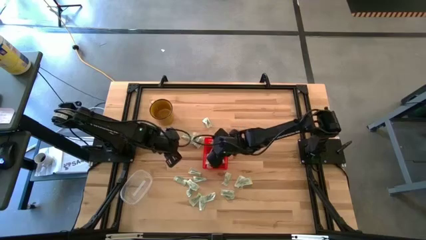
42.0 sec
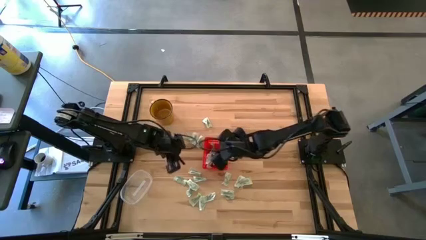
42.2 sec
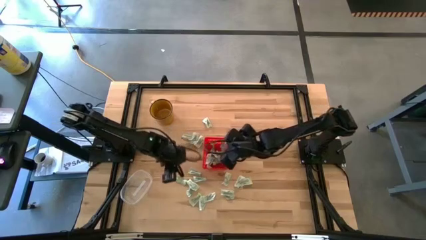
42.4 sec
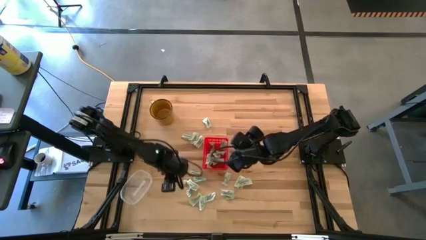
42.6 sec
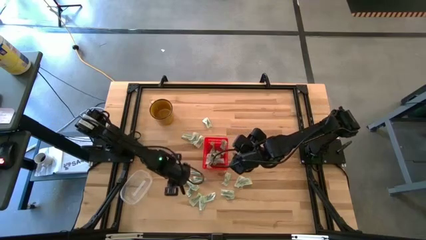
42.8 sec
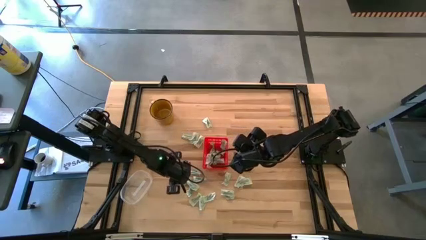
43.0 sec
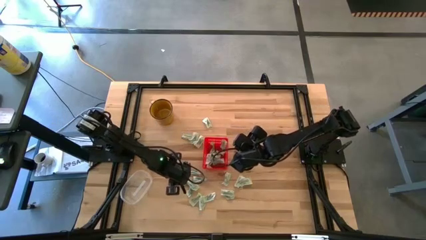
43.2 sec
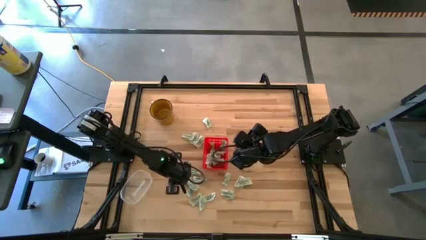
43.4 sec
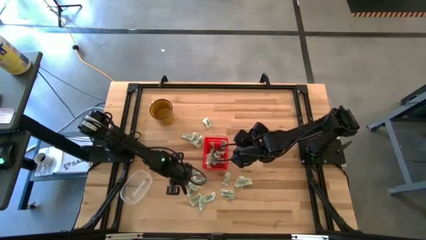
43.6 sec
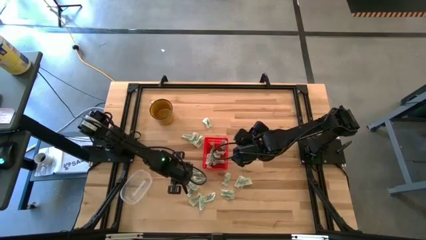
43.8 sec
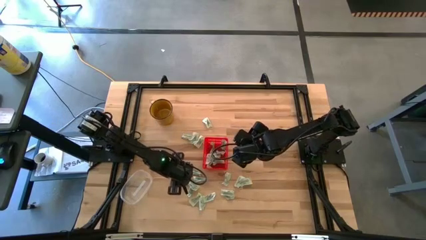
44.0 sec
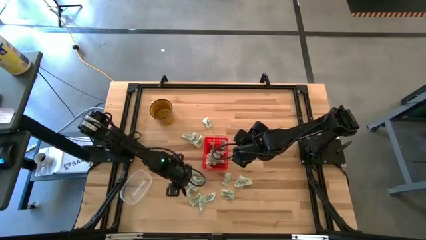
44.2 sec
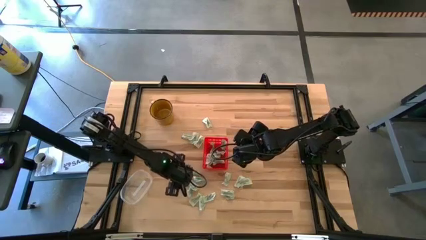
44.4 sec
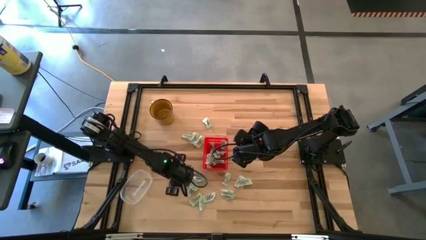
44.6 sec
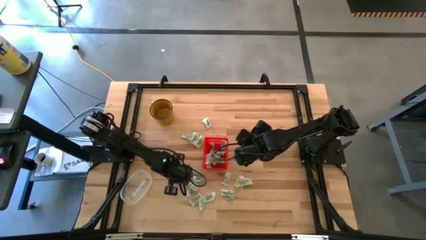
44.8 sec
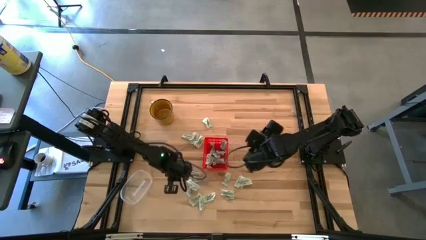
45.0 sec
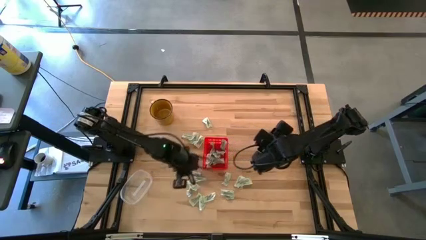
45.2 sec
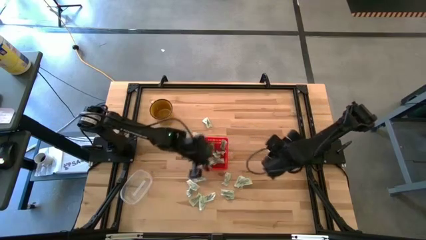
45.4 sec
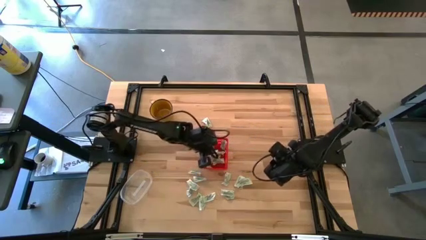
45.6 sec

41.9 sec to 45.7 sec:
Task: Pick and place Stevia / Truvia into bins
Put the white stevia packet into the red basket

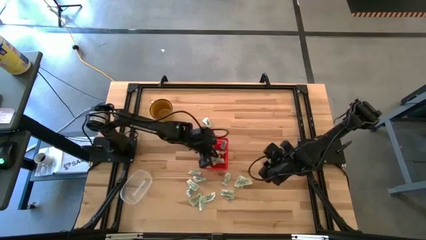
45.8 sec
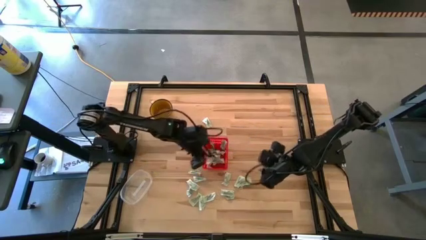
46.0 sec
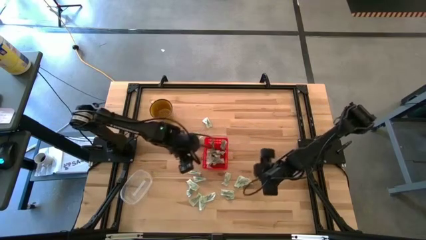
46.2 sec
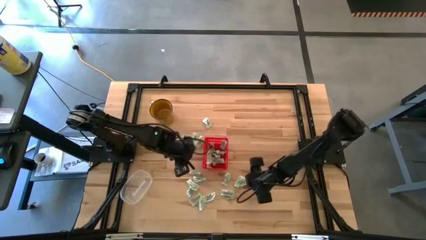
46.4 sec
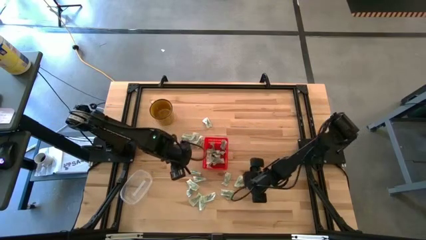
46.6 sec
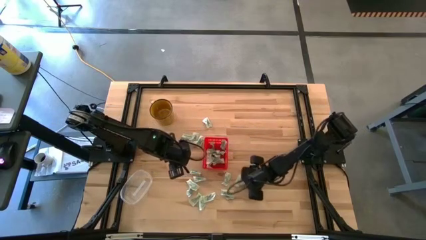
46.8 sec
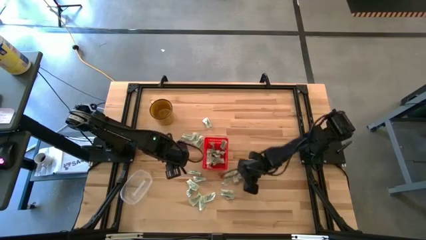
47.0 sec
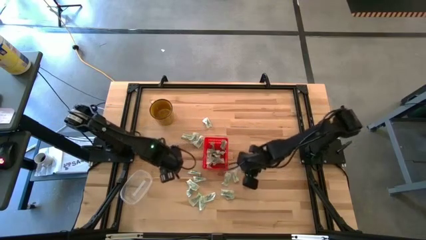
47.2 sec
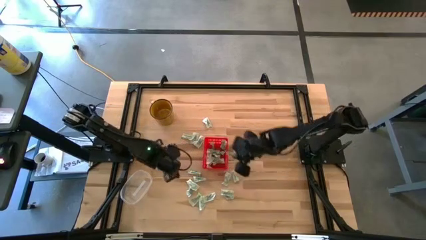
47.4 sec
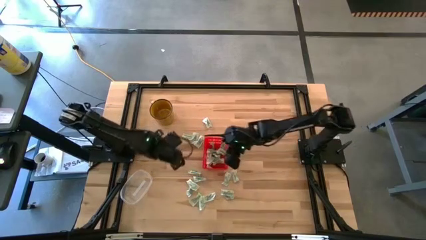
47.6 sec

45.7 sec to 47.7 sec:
Put the white stevia packet into the red basket

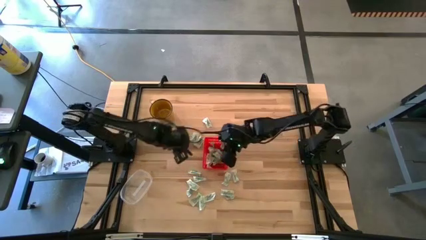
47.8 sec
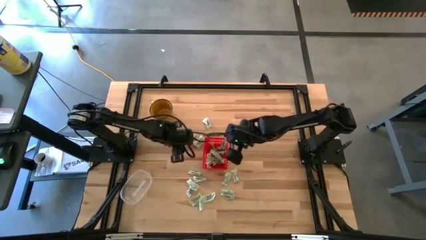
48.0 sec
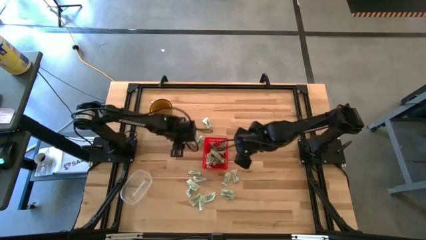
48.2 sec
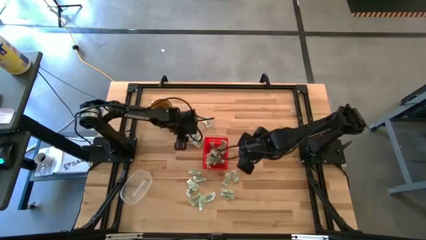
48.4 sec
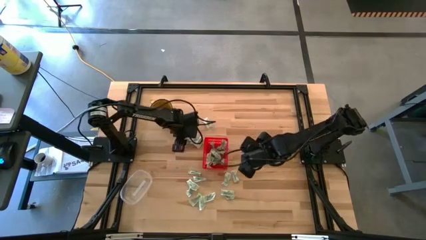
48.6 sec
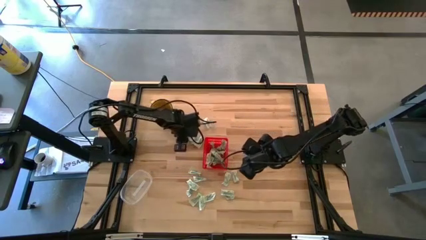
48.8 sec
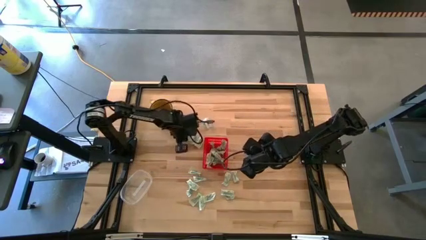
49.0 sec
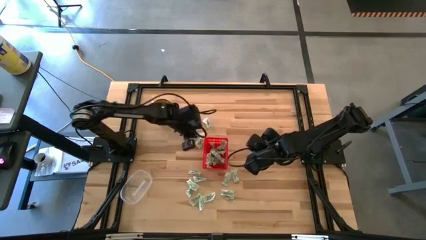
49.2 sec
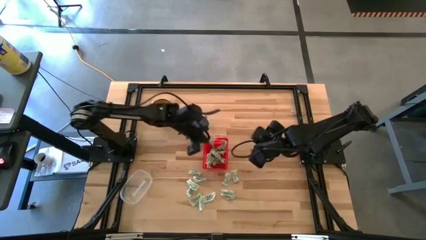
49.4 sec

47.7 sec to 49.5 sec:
Put the white stevia packet into the red basket

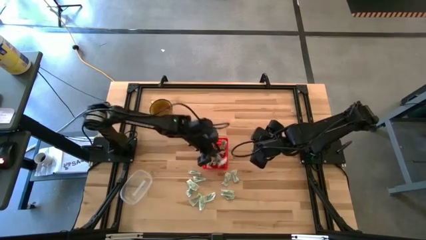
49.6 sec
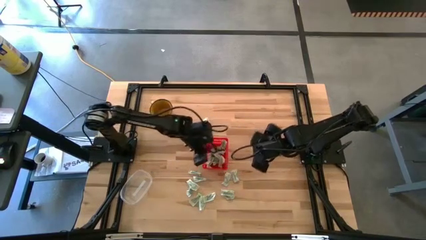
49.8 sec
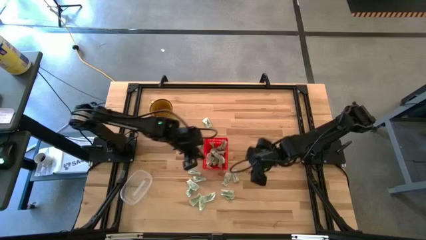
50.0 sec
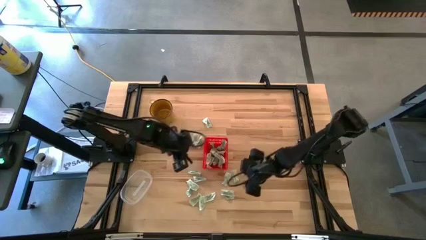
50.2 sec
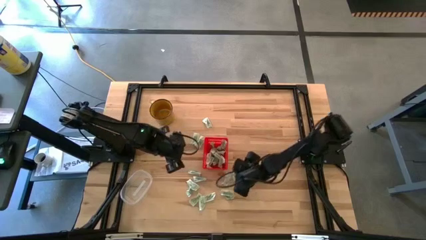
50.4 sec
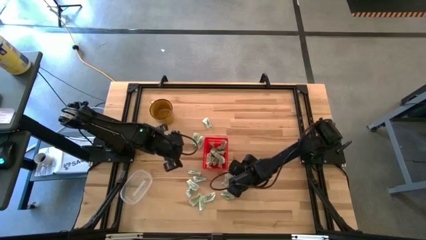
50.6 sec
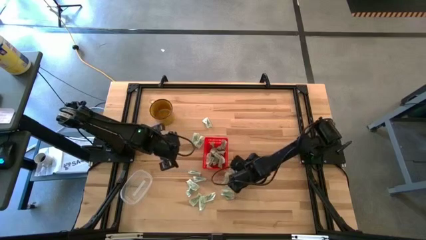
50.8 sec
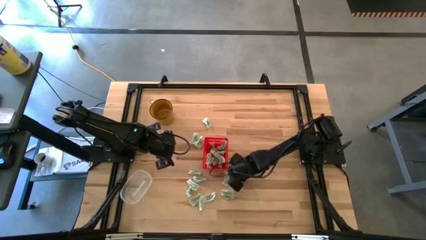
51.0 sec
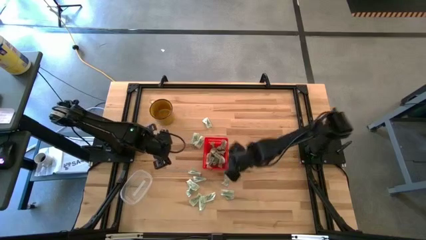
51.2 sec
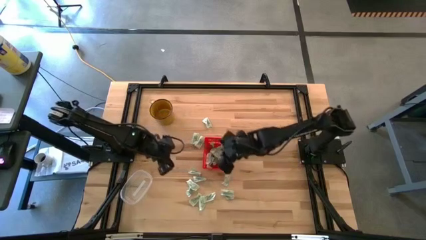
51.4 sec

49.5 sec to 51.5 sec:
Put the white stevia packet into the red basket

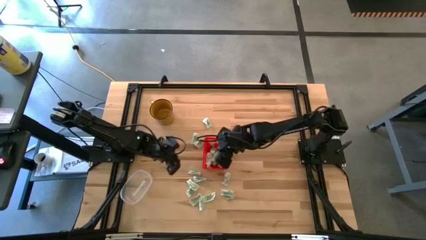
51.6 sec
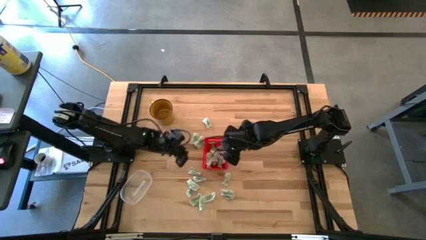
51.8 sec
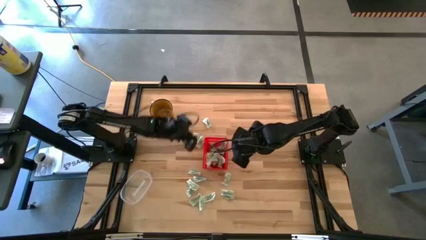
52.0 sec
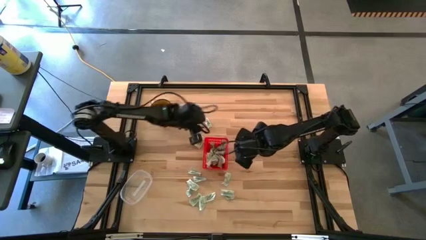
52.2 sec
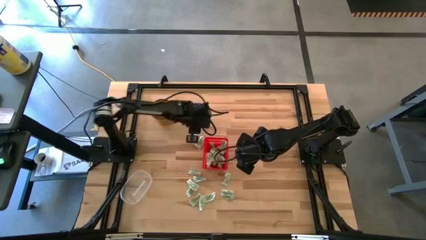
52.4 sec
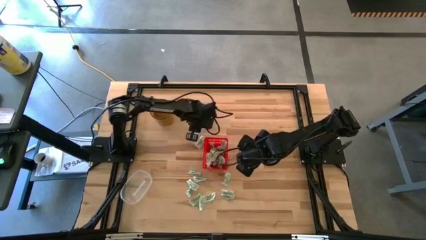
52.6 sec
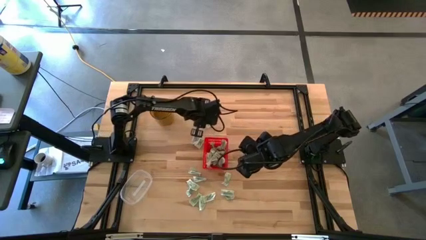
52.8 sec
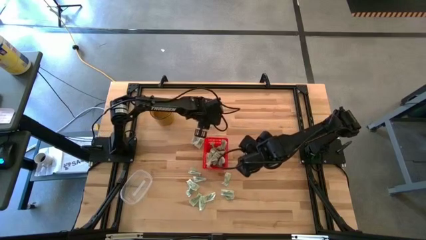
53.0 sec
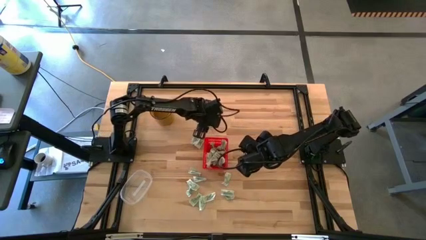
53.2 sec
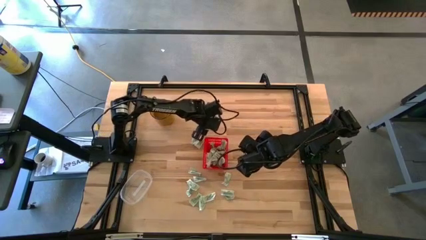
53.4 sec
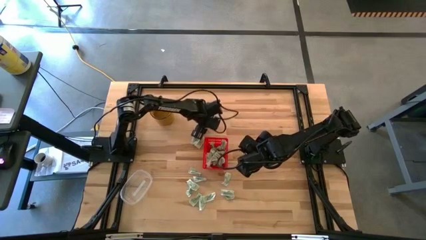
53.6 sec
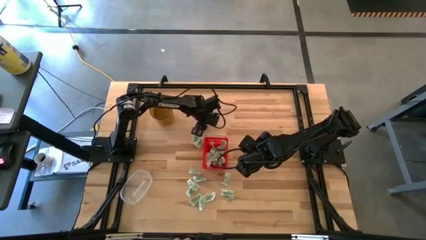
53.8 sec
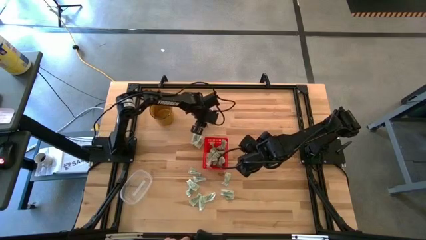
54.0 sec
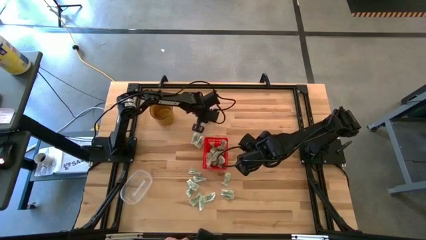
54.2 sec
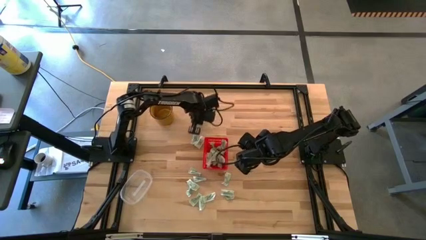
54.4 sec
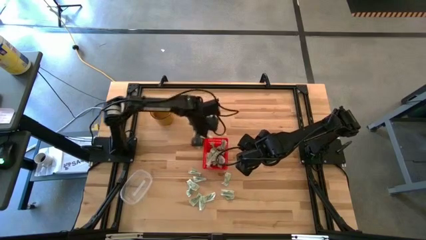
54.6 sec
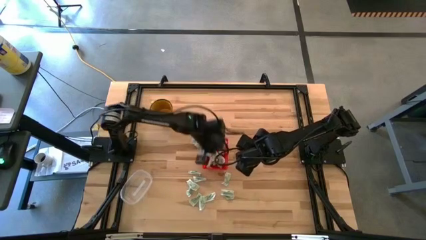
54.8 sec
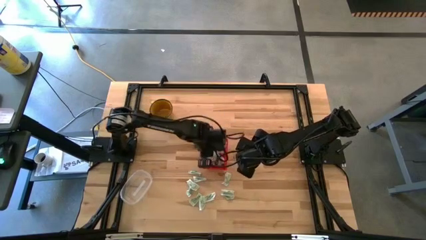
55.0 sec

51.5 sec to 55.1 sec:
Put the white stevia packet into the red basket

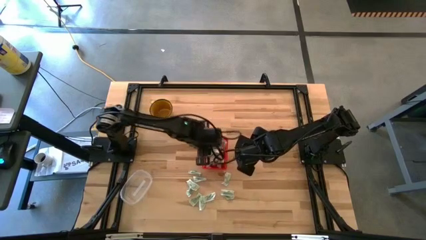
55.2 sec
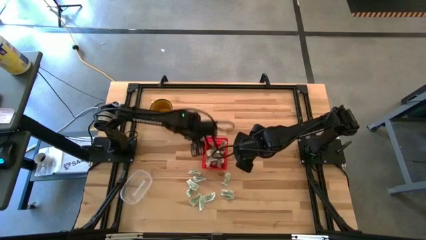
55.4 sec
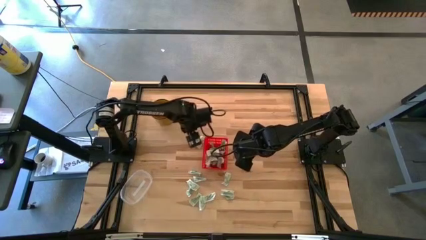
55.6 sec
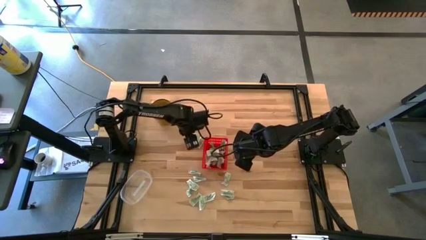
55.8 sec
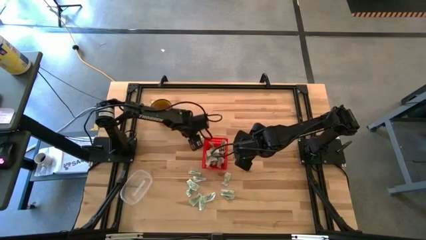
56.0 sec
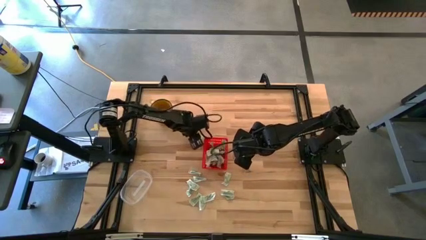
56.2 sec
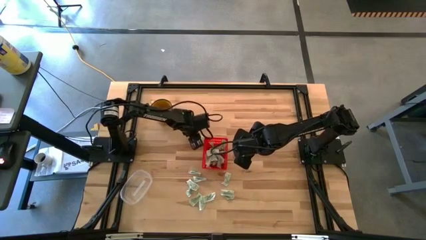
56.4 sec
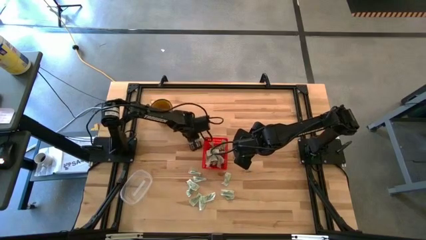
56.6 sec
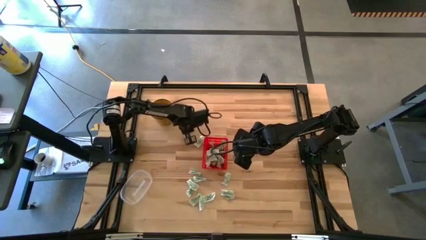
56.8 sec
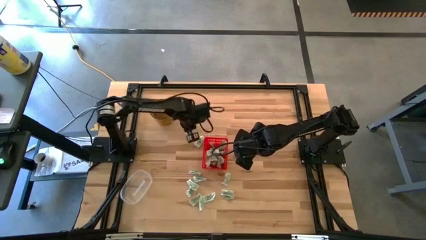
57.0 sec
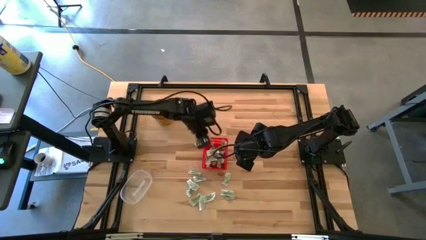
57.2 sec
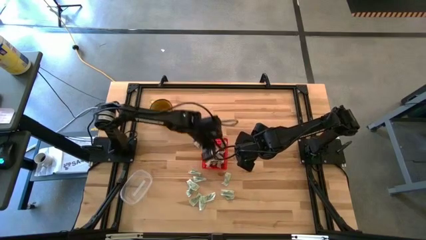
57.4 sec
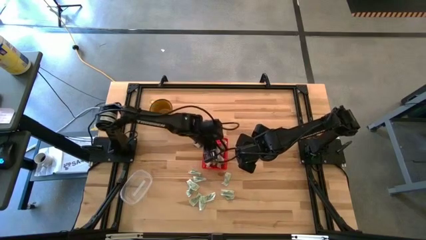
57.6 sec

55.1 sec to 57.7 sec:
Put the white stevia packet into the red basket

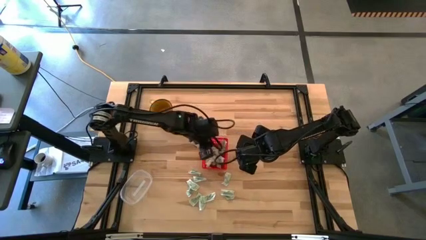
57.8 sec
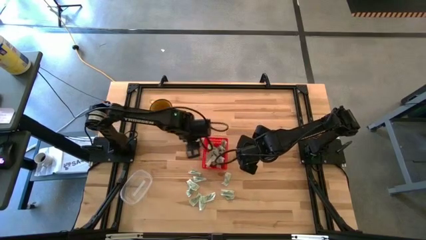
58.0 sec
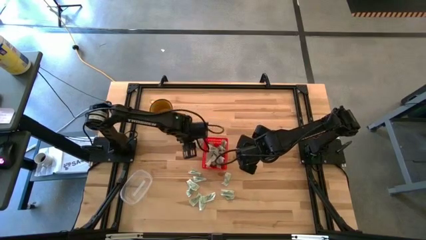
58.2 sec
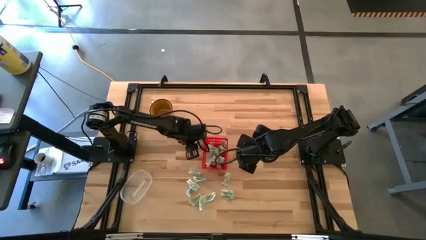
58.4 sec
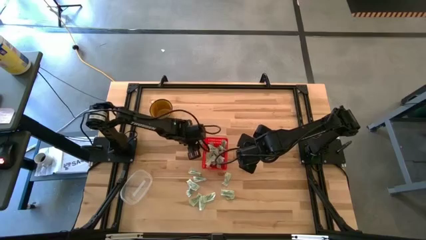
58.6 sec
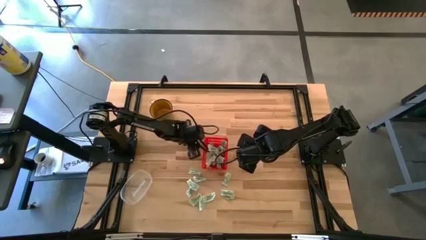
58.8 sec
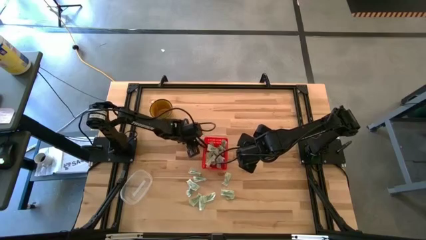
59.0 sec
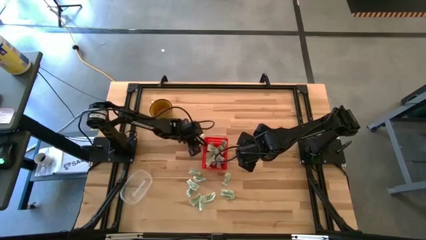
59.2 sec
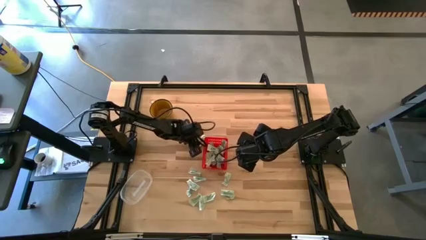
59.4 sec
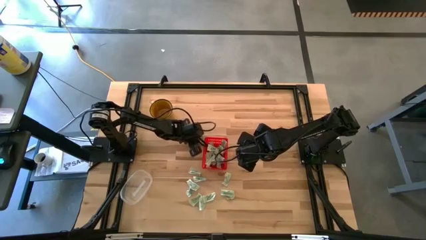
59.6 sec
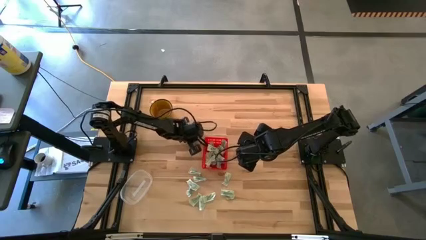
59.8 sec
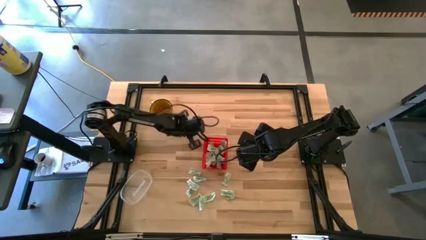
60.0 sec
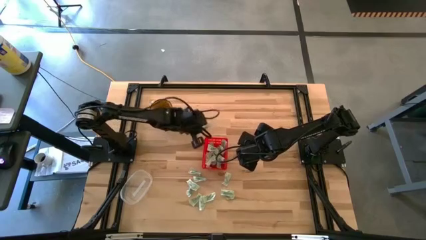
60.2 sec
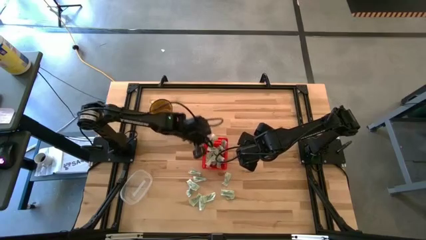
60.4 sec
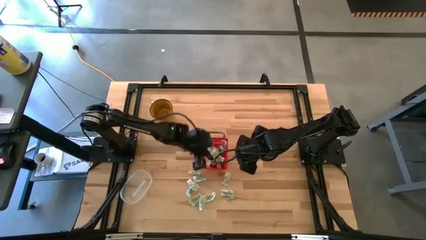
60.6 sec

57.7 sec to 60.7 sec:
Put the white stevia packet into the red basket
